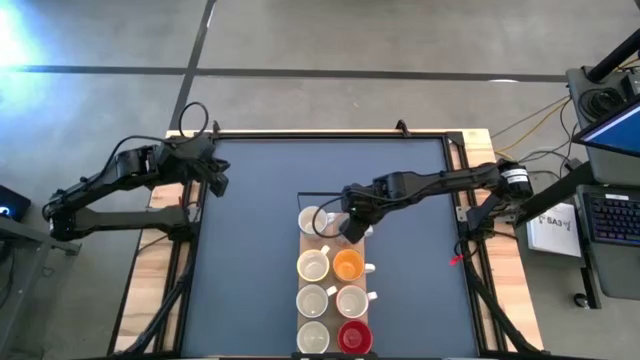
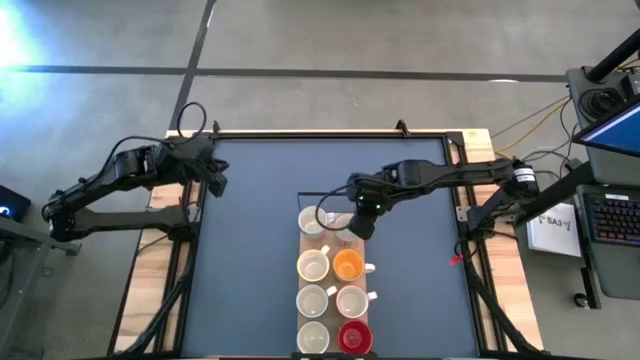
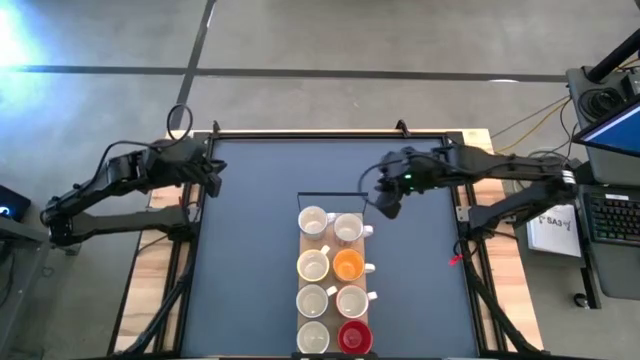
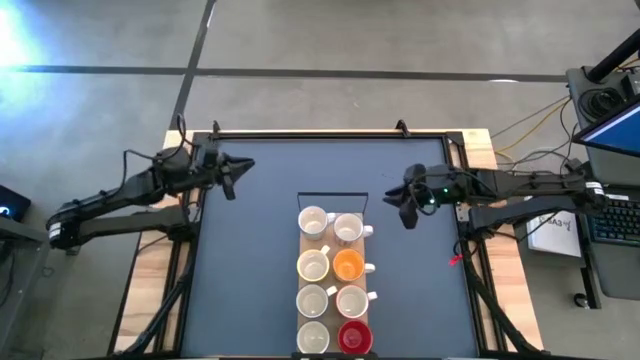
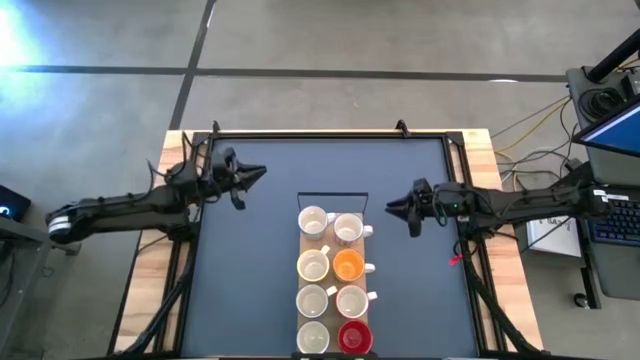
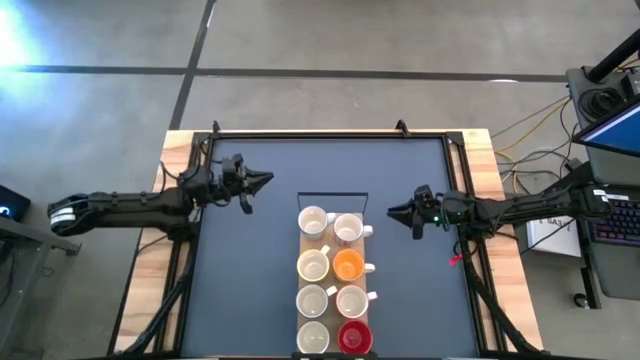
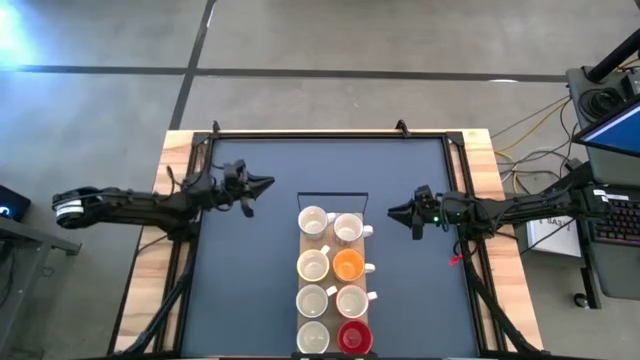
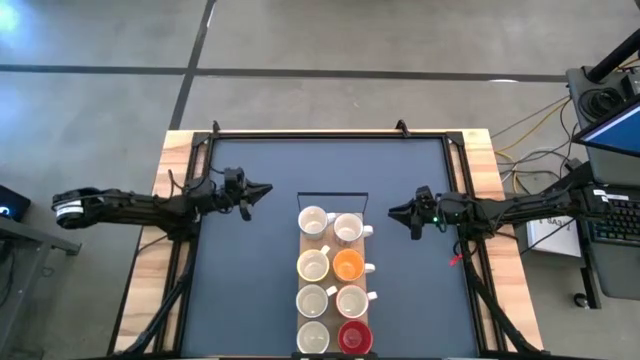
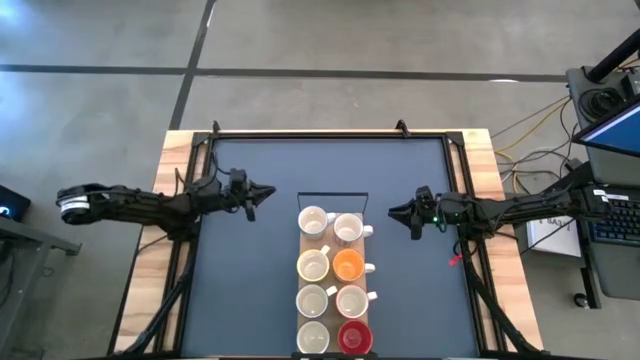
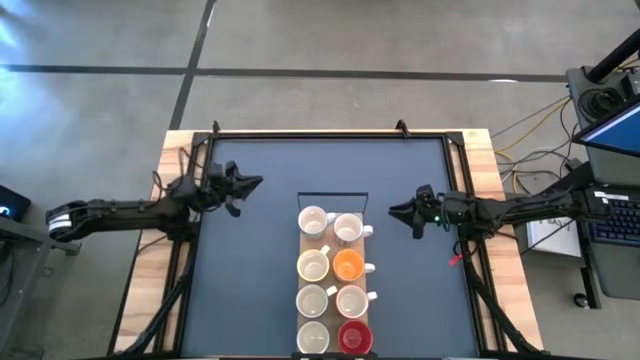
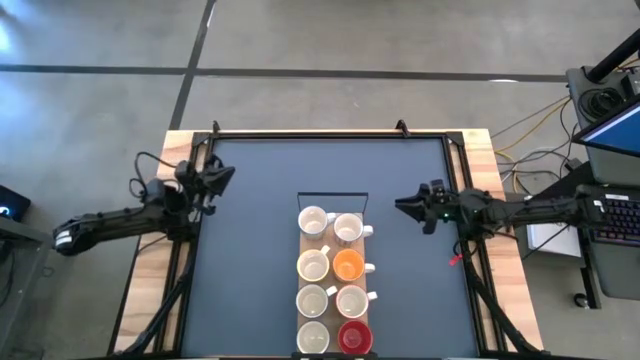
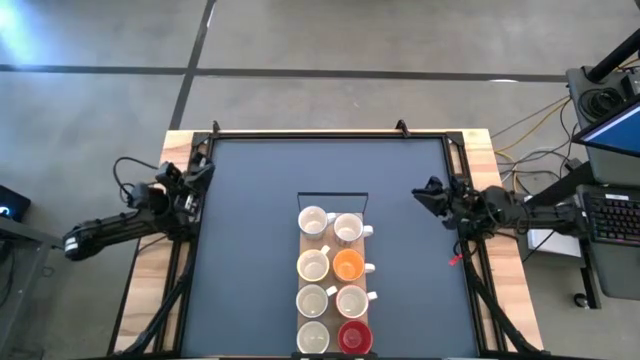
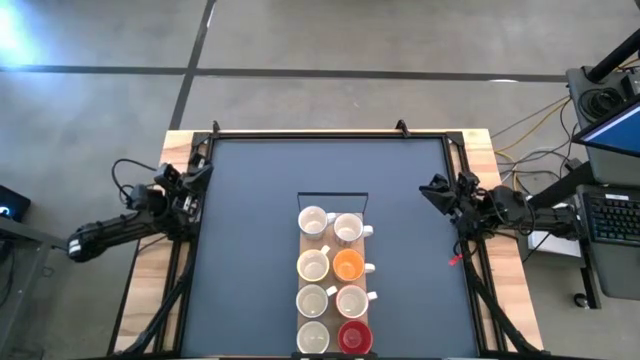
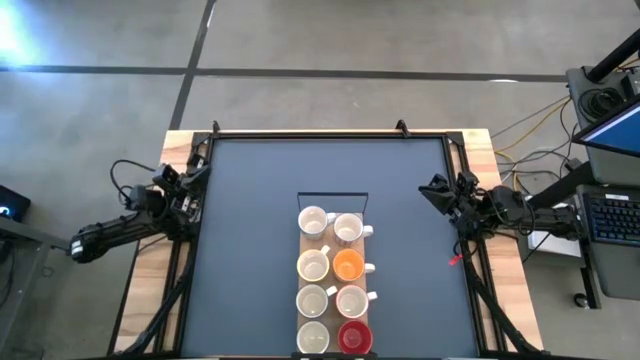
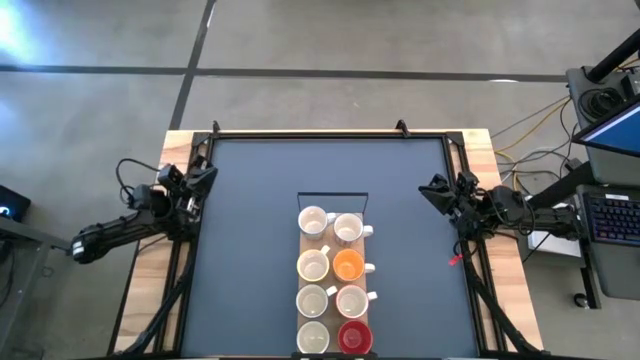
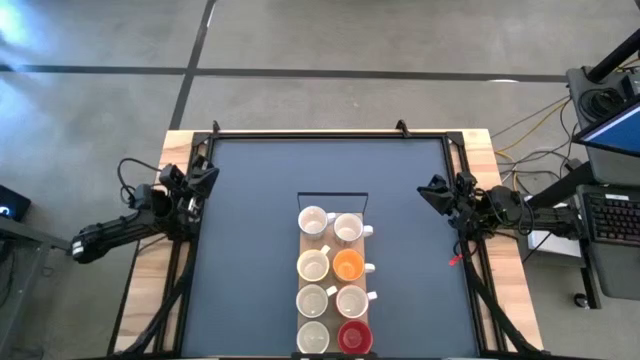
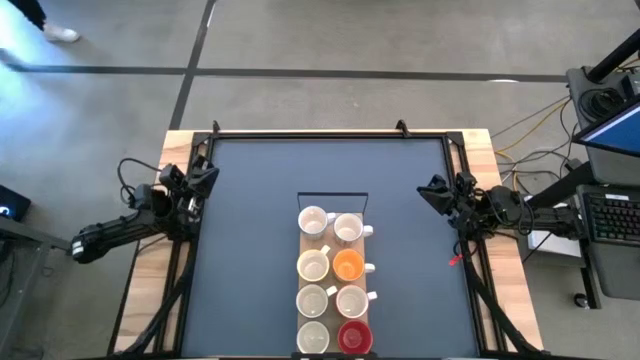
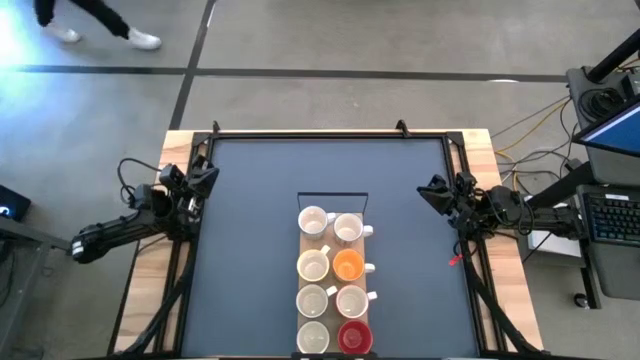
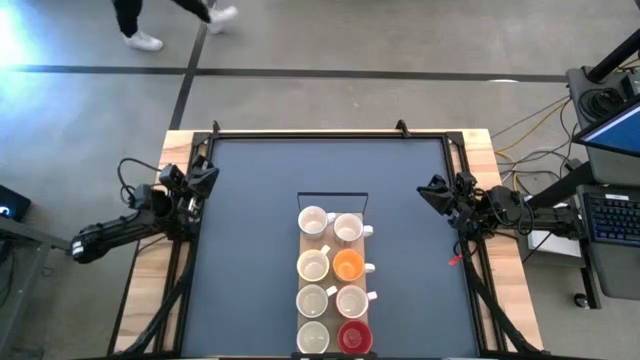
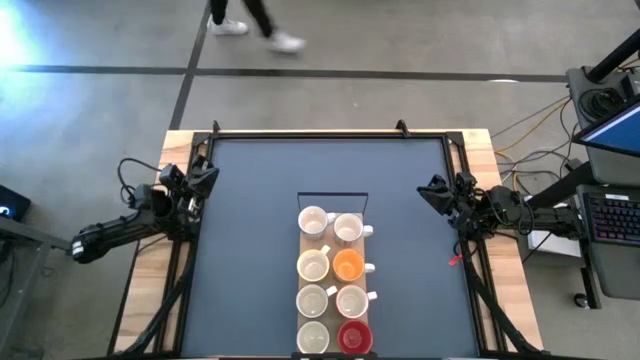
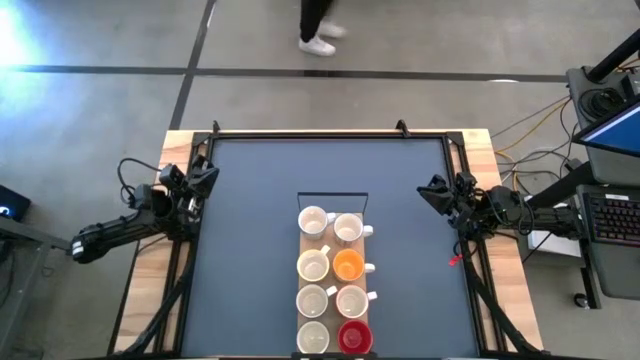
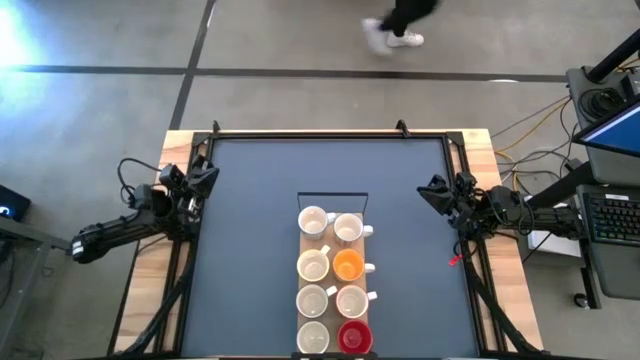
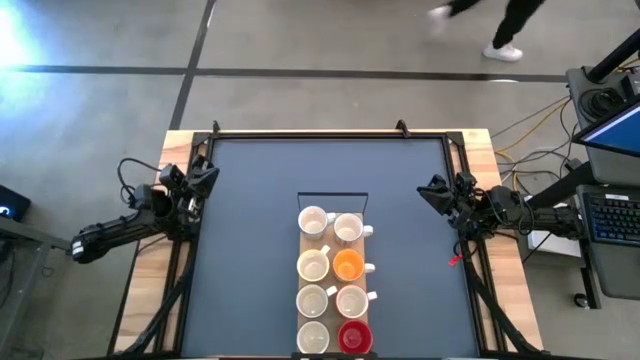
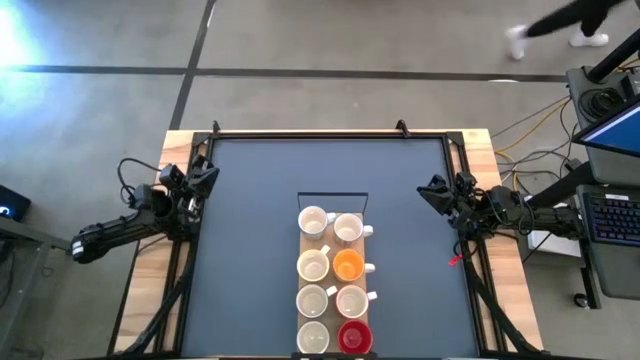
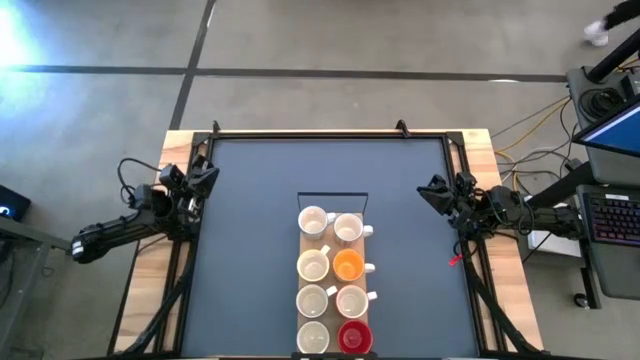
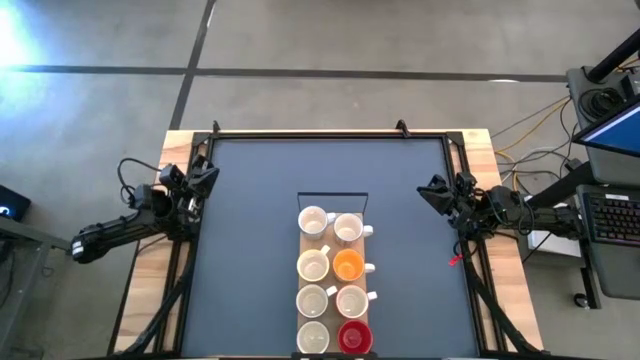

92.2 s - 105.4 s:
Task: Place coffee mugs
Return to Home Position

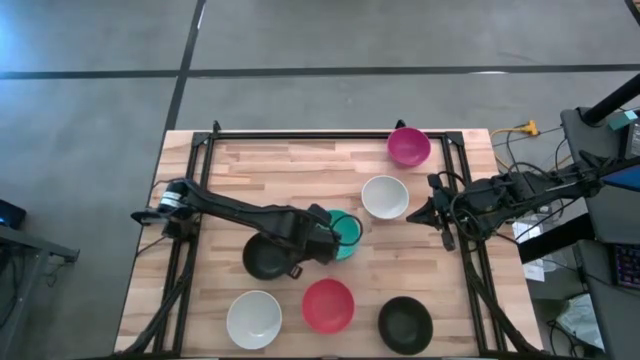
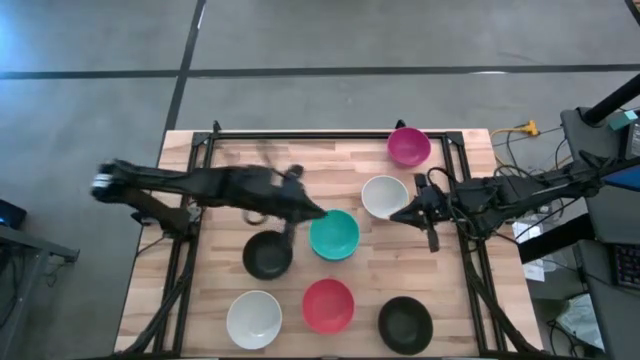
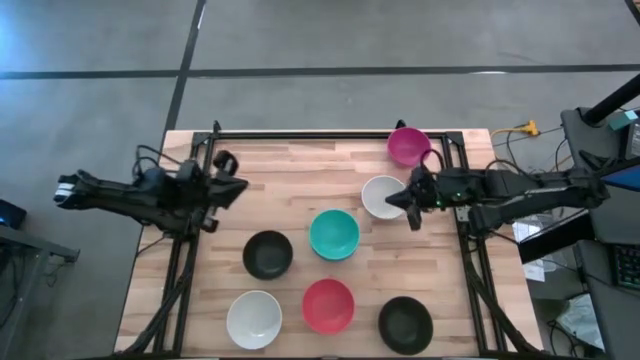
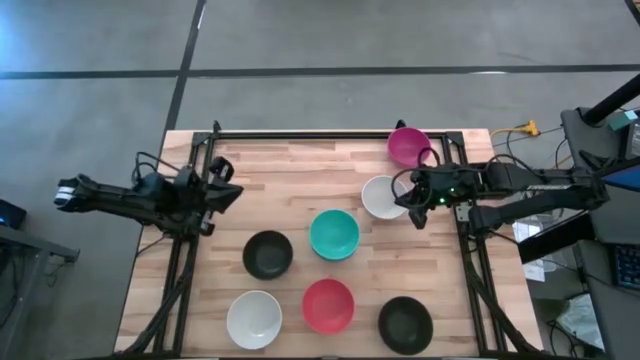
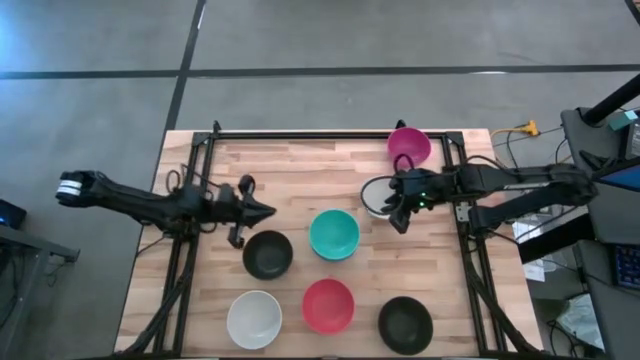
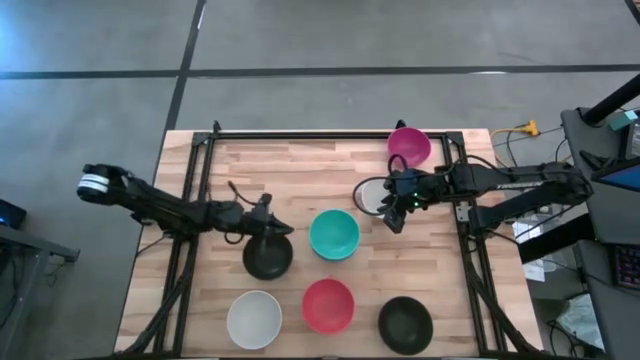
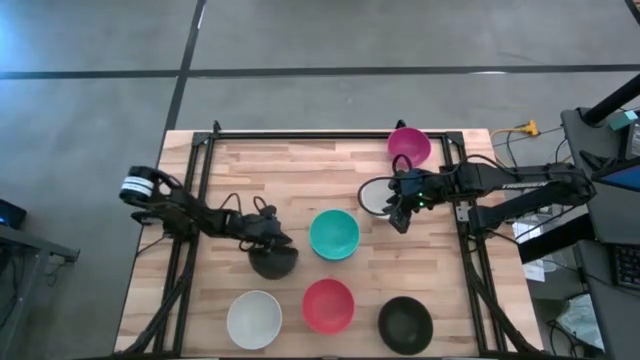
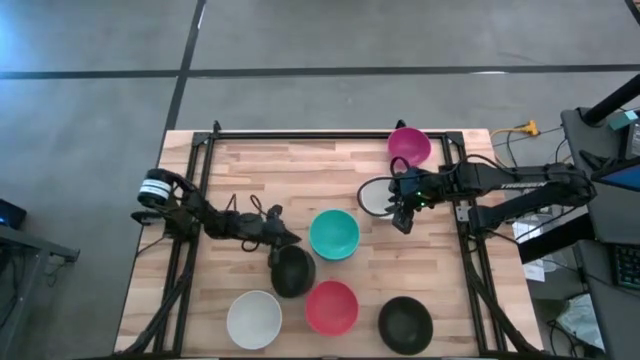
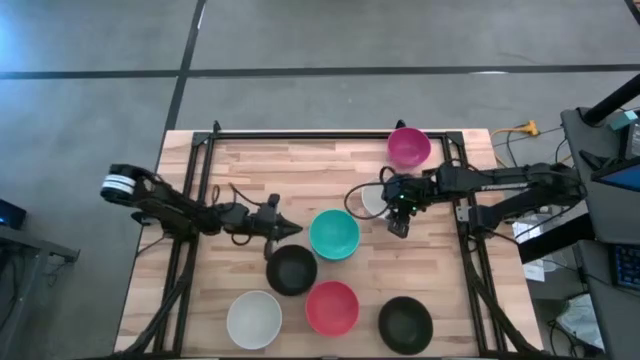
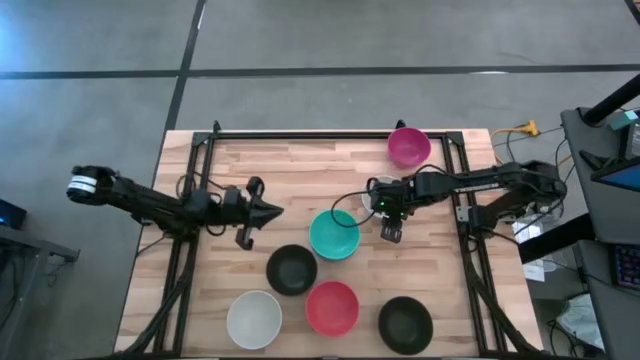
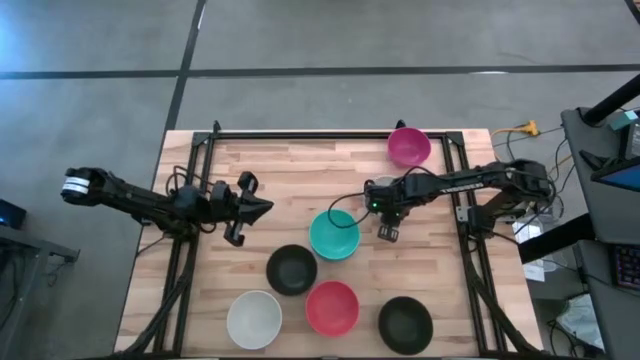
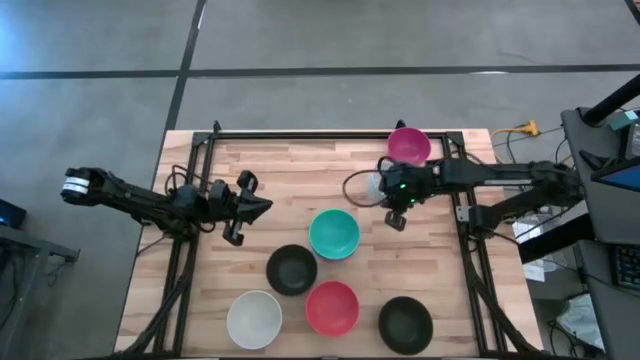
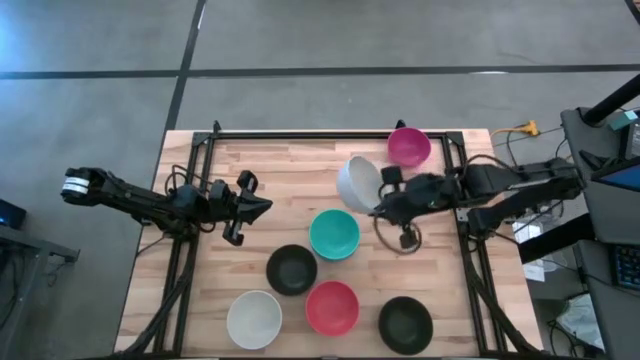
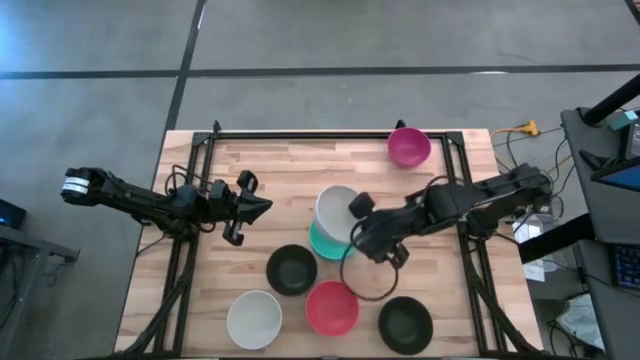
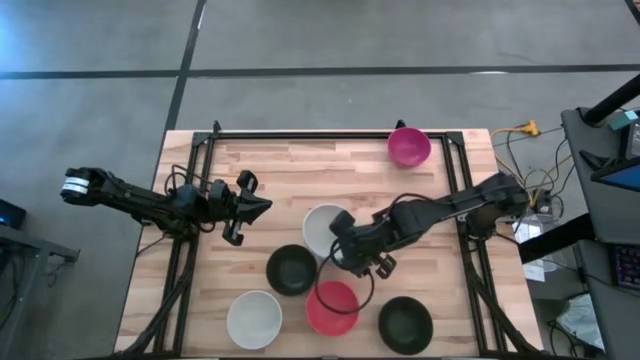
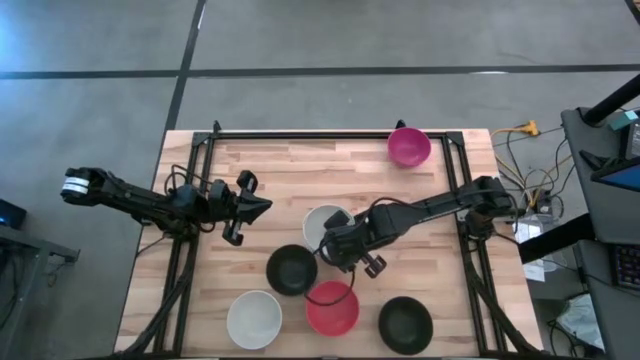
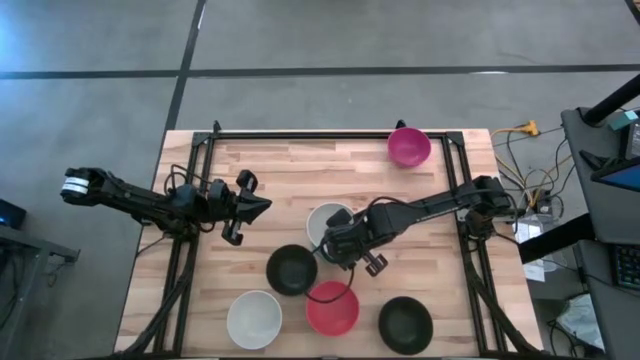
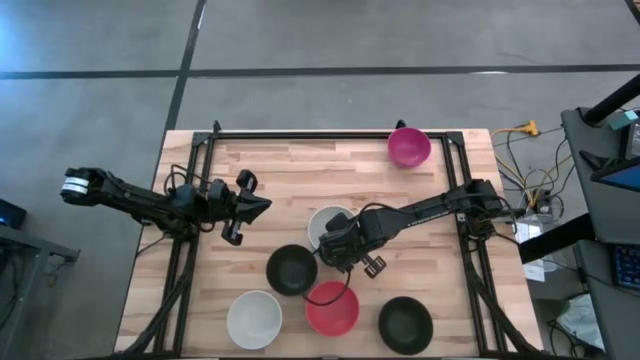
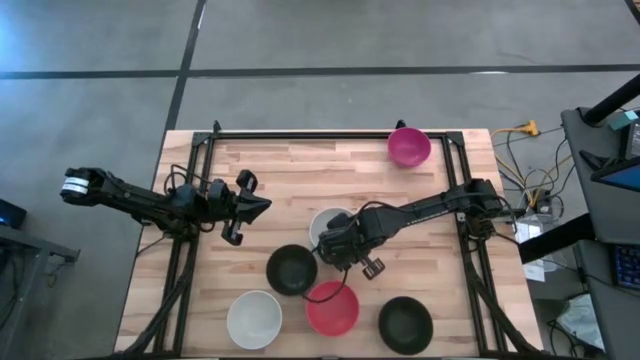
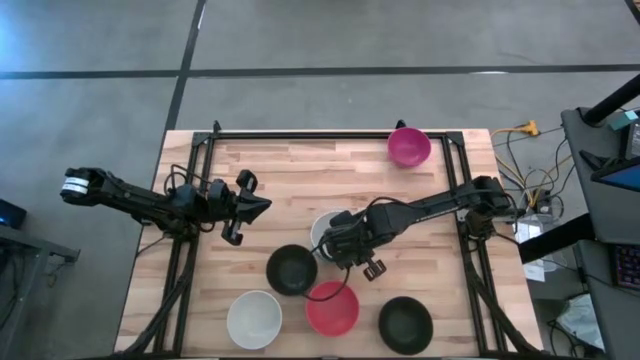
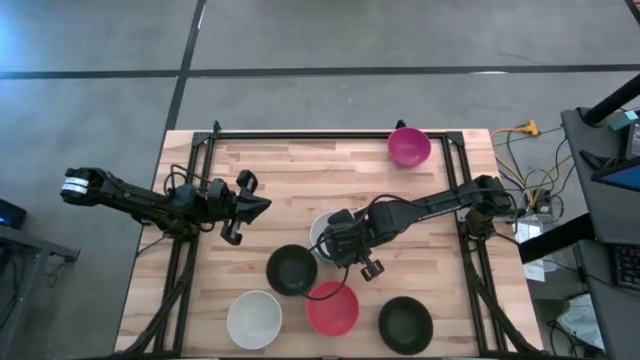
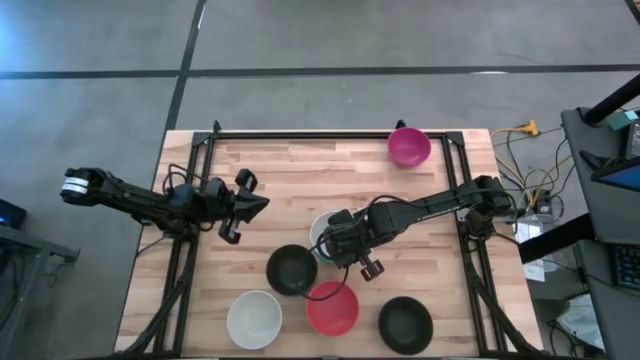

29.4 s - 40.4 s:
Task: Nest bowls inside each other
Stack the top white bowl on top of the light blue bowl
